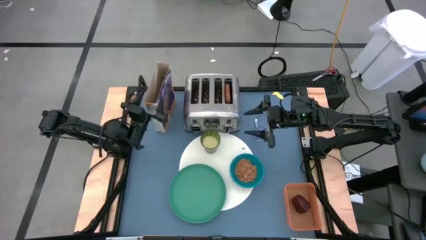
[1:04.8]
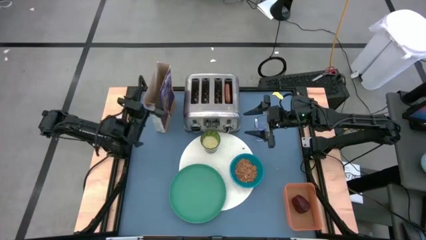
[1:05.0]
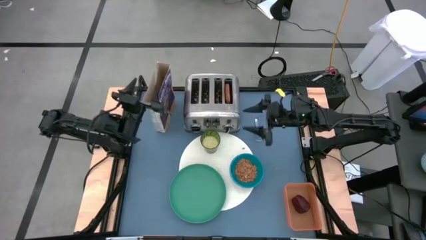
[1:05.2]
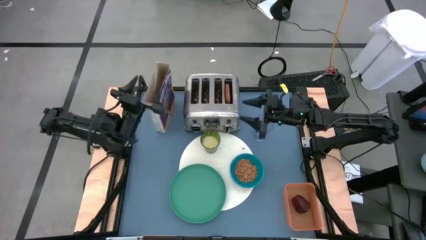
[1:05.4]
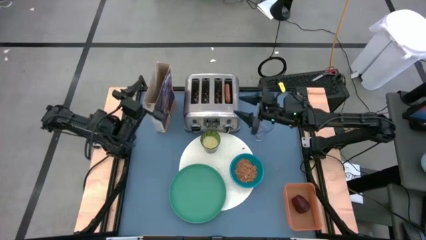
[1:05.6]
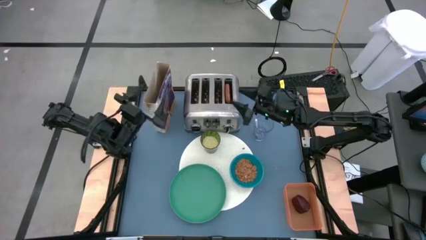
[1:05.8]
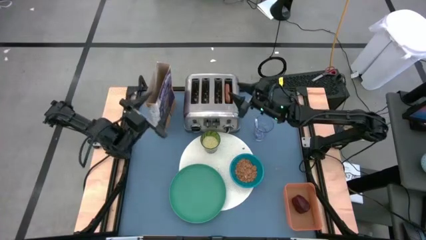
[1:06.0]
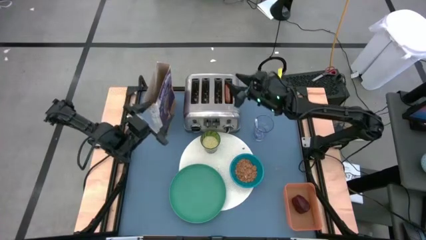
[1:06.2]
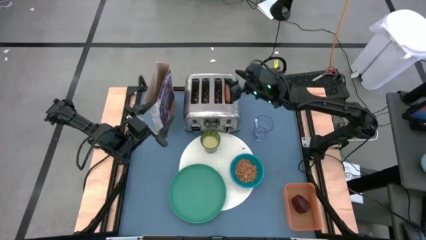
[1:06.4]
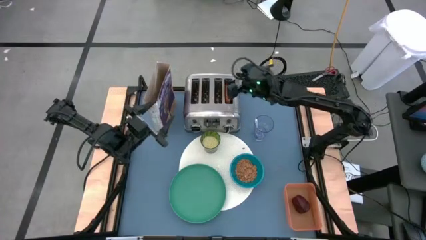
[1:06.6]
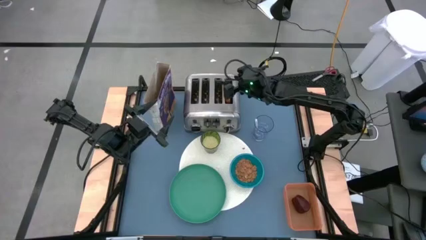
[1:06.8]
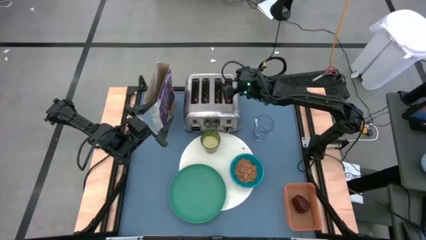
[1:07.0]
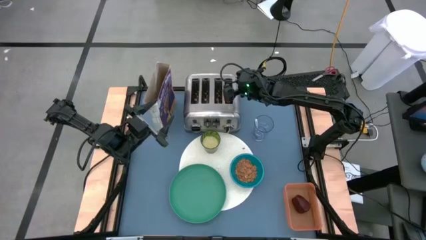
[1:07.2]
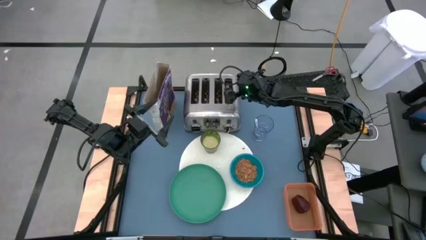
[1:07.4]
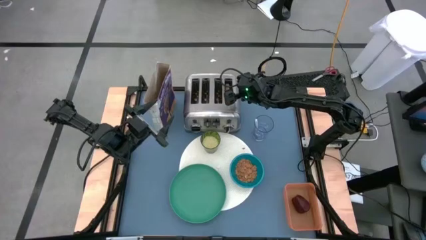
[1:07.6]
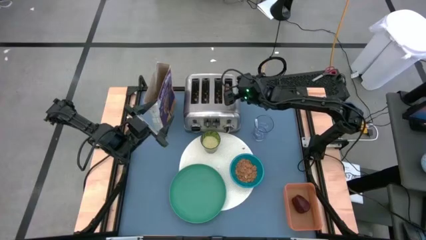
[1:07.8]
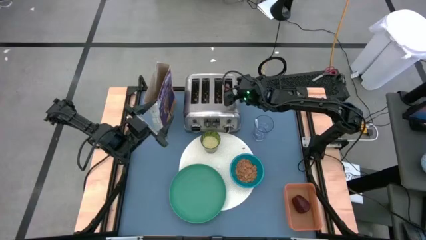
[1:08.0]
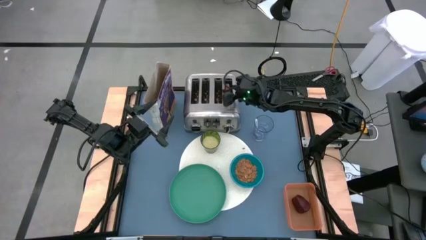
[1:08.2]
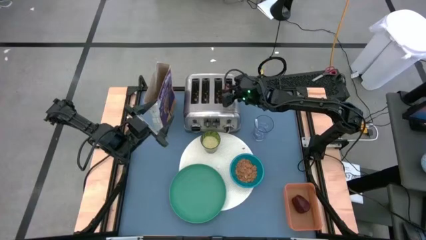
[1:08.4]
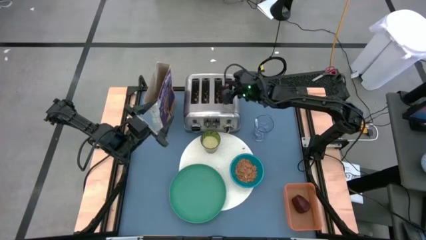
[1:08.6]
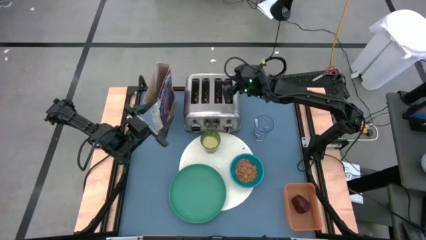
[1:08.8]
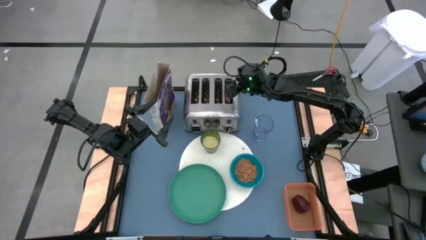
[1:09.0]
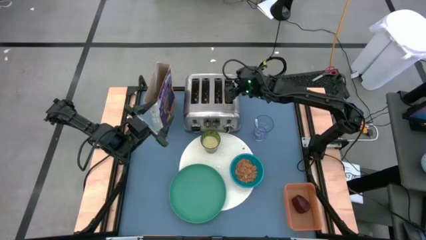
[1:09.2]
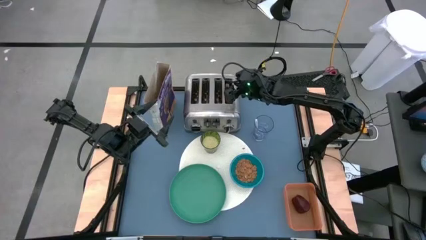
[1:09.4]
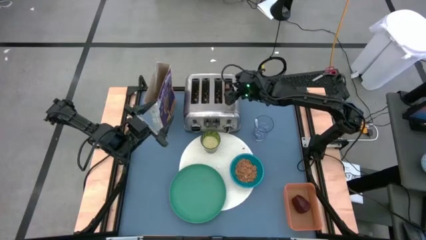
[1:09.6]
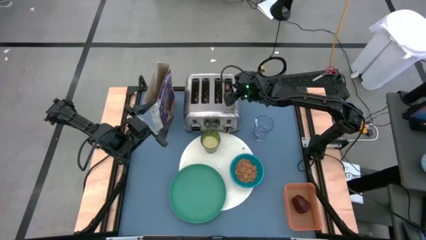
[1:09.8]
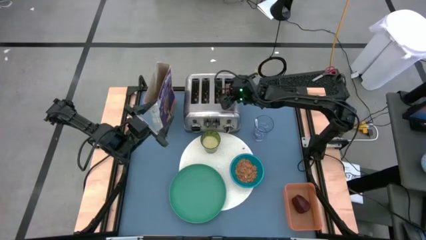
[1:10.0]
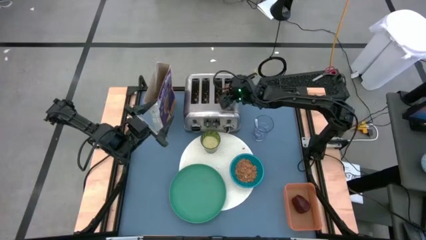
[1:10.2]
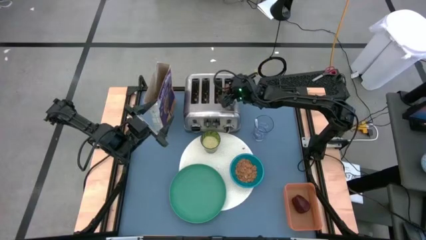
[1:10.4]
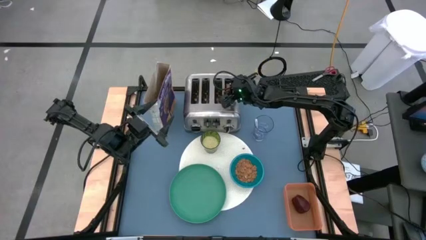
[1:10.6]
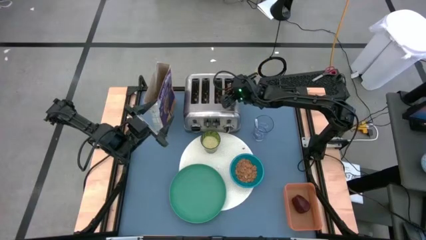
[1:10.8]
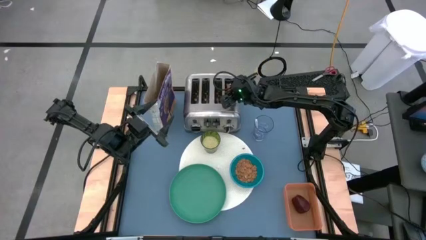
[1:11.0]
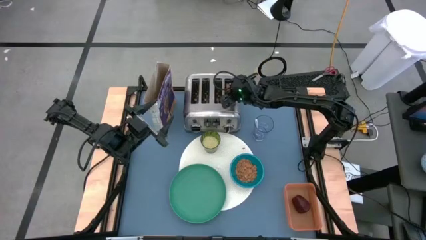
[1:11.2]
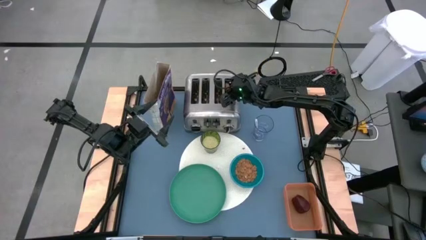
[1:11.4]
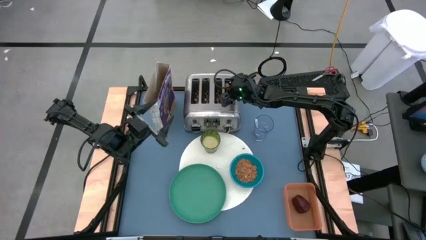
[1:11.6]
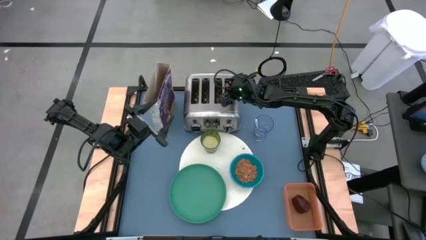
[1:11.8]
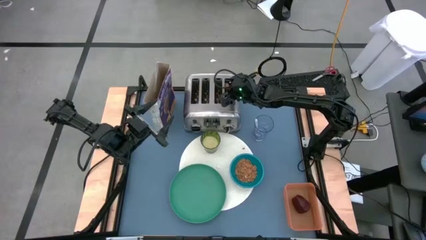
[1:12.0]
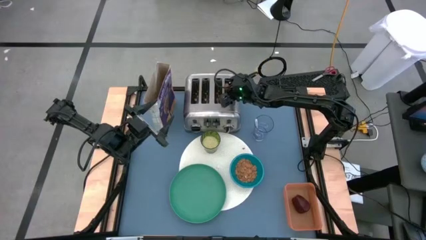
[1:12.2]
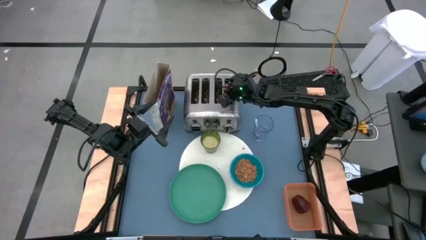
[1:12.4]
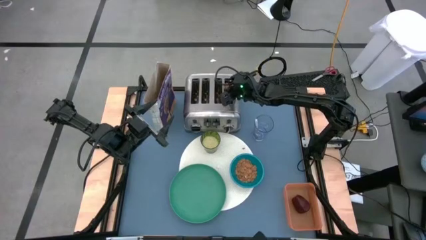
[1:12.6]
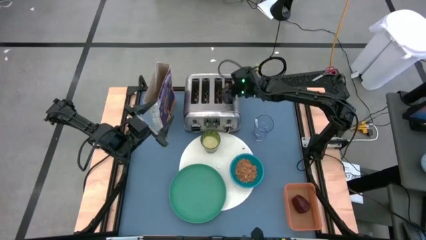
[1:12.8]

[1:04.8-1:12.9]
Task: Arrange a breakfast setting
Put the bread on the green plate

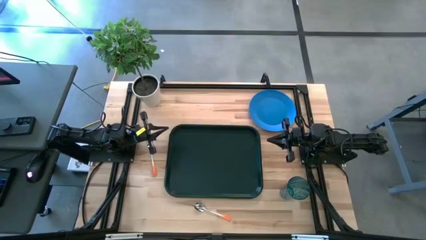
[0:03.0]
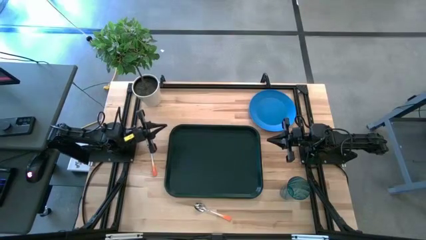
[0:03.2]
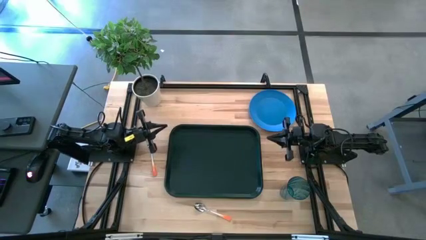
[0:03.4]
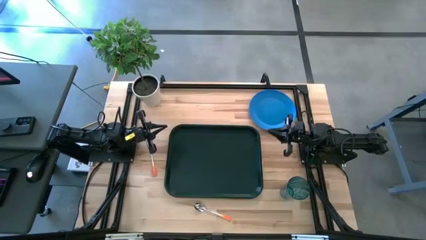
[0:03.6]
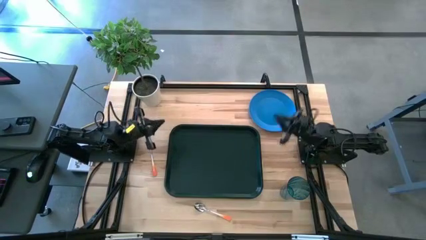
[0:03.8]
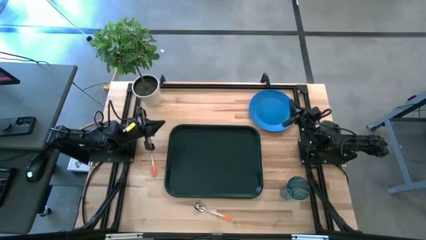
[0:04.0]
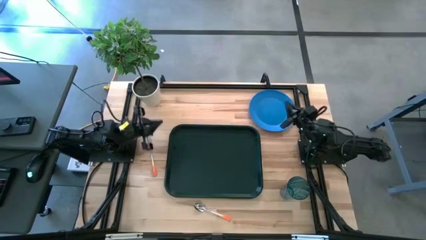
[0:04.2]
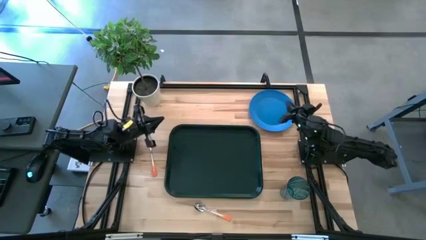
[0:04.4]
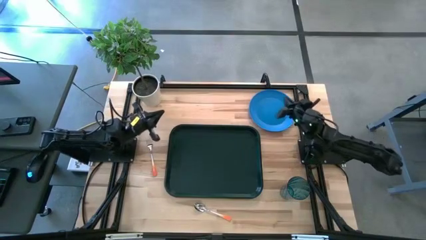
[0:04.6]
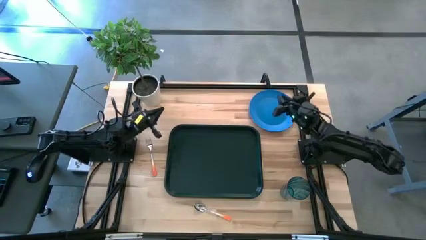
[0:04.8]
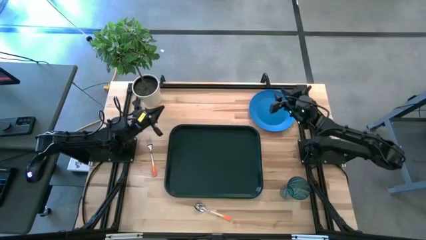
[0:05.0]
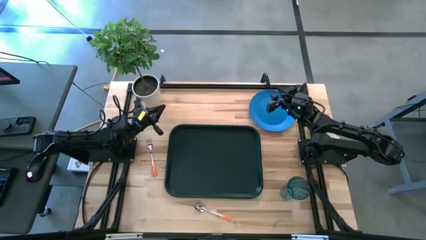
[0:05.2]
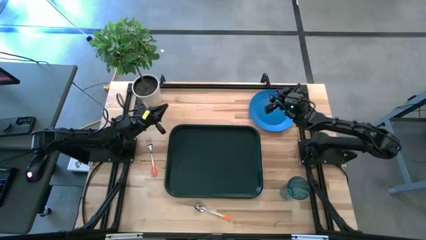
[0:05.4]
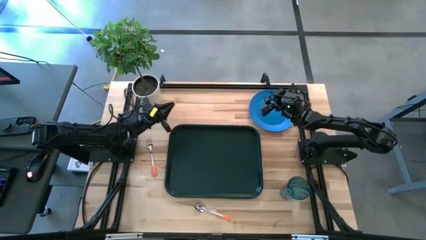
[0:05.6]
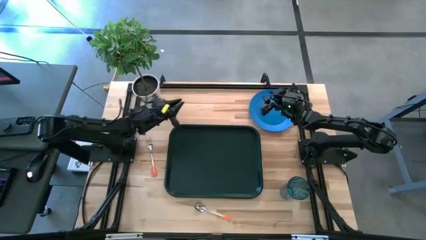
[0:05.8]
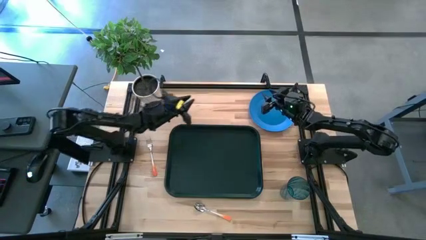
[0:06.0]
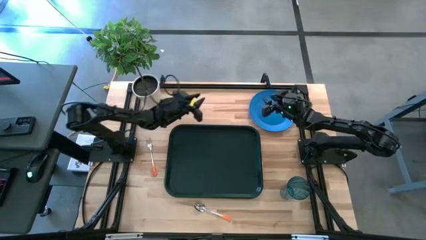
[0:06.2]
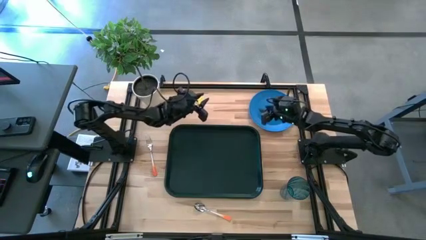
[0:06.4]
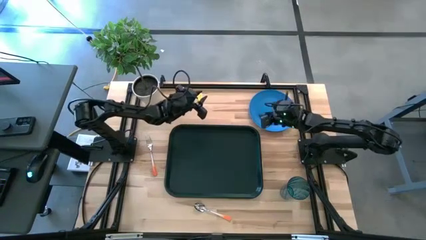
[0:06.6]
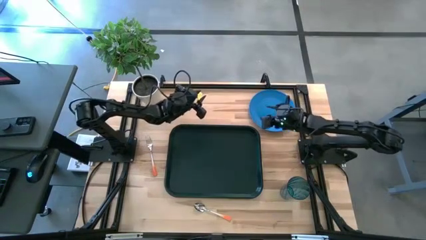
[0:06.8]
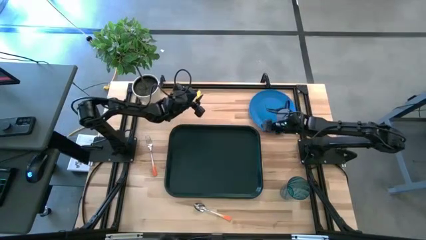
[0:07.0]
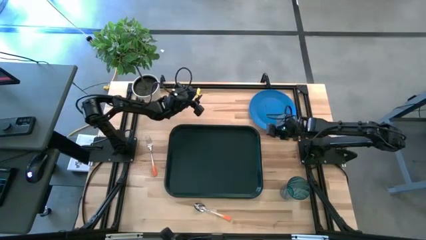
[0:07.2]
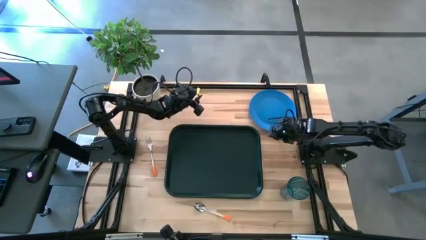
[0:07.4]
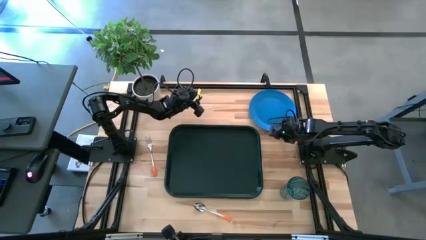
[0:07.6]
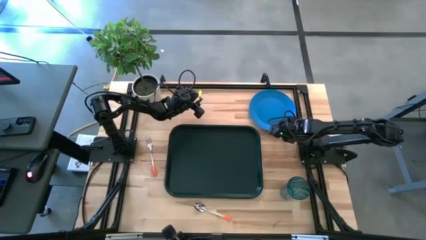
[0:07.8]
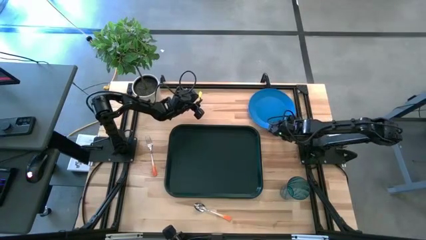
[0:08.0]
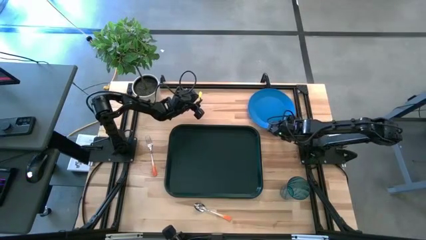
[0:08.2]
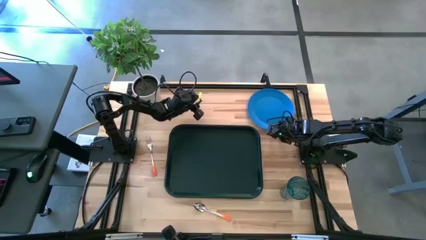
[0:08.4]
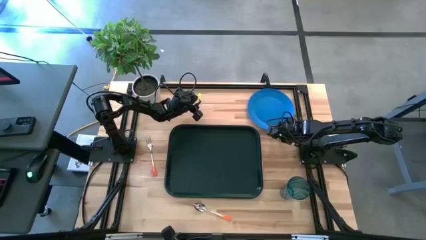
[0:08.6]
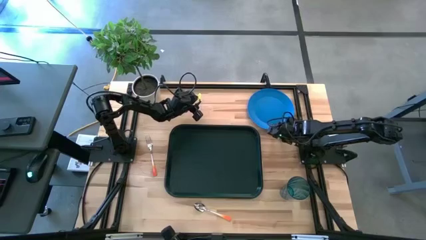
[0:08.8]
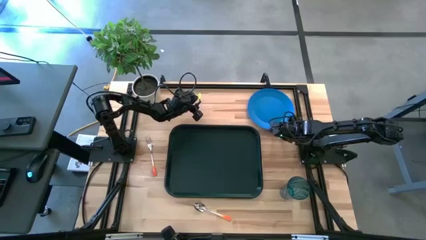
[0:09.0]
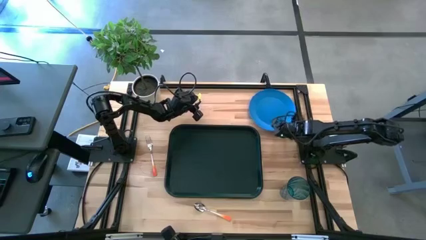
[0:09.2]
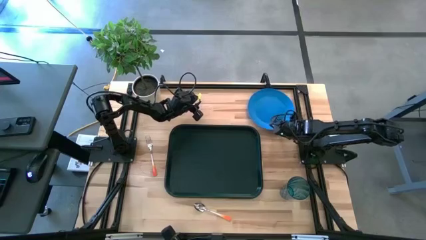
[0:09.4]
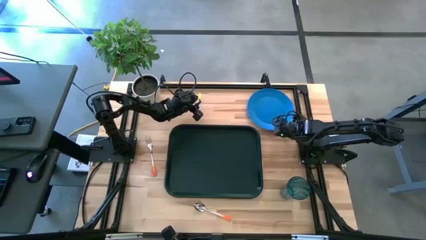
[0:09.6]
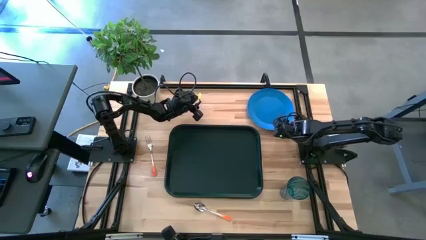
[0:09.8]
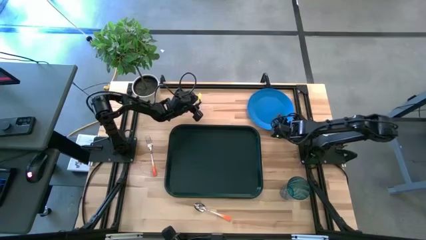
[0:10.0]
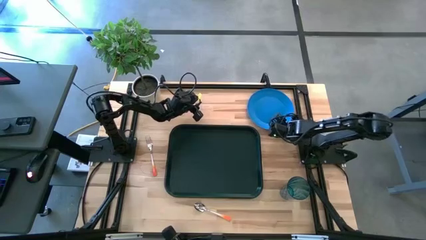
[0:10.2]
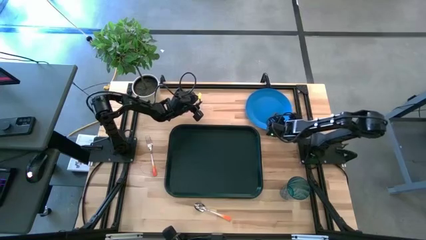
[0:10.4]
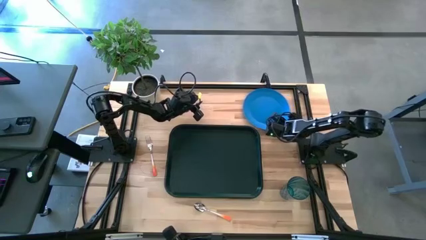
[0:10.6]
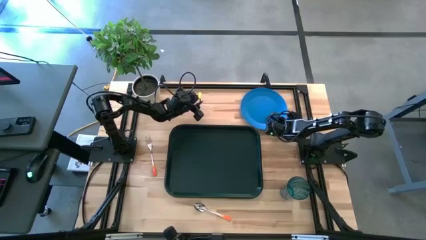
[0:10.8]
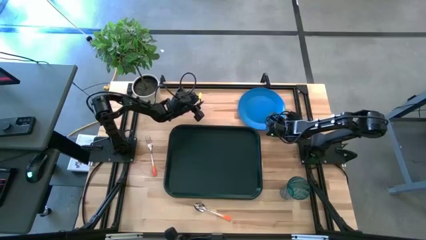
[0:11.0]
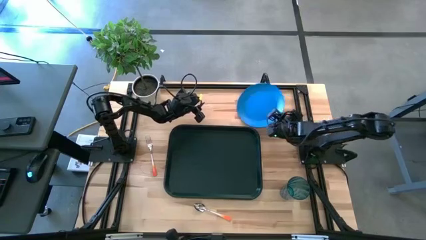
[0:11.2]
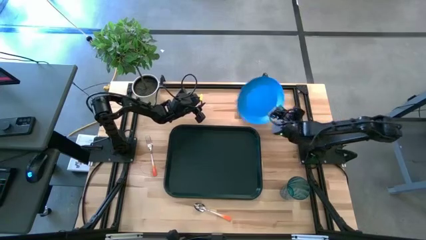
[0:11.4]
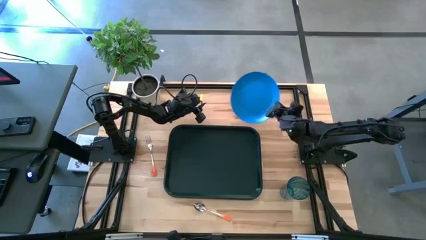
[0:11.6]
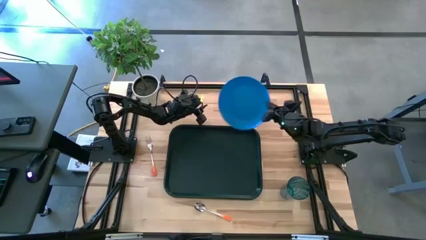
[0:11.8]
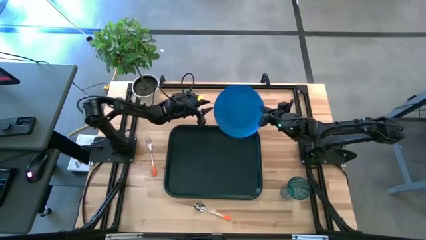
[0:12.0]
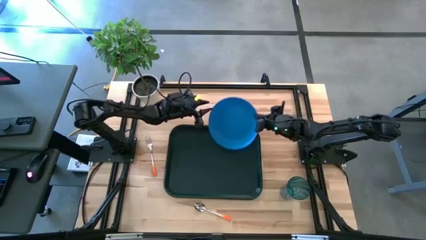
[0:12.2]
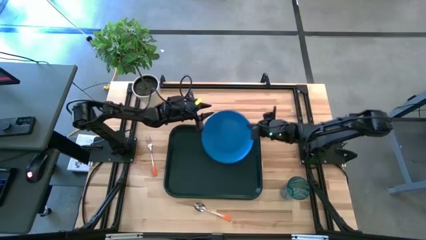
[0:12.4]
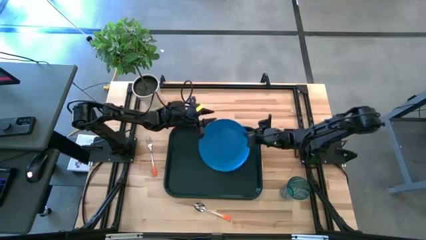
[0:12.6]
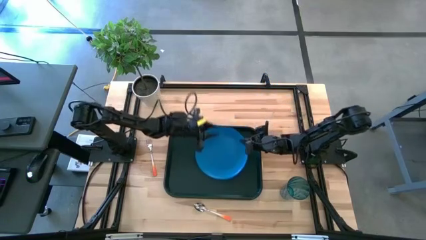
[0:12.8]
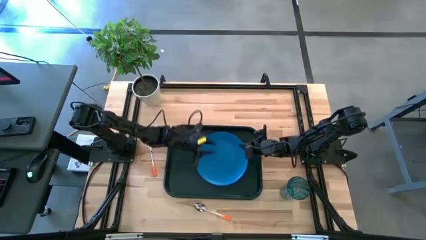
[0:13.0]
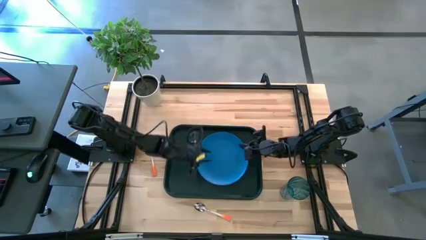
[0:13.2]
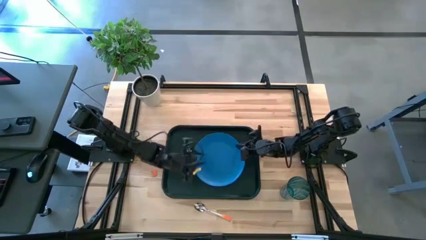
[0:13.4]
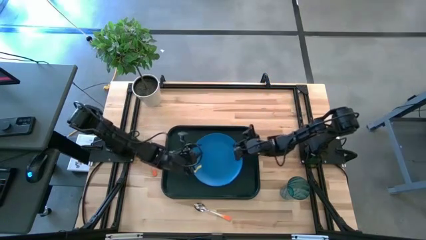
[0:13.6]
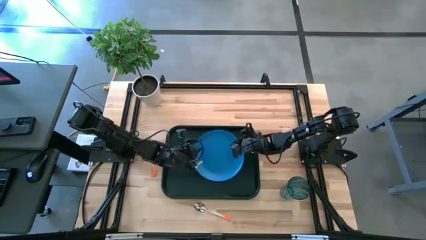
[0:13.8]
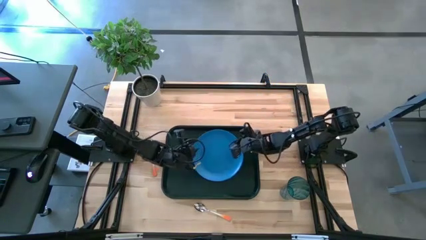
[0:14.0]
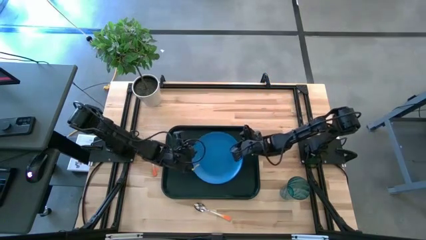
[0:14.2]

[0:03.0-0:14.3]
Task: Pick and place plate/cup/fork/spoon on tray
Put the blue plate on the black tray
